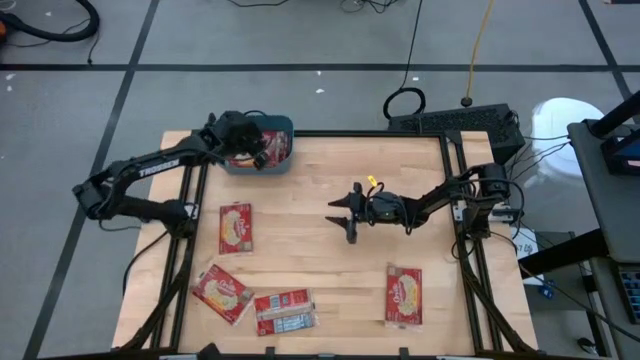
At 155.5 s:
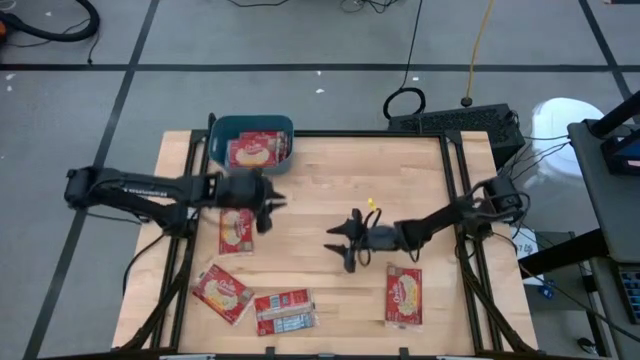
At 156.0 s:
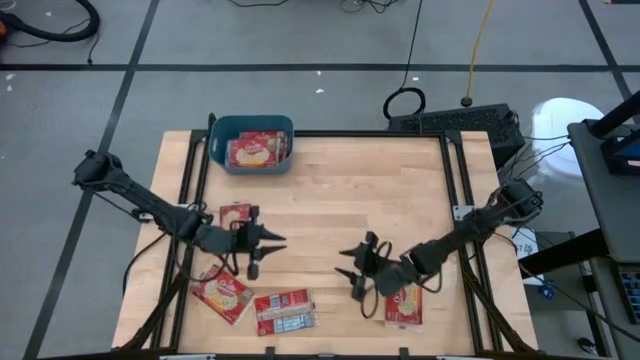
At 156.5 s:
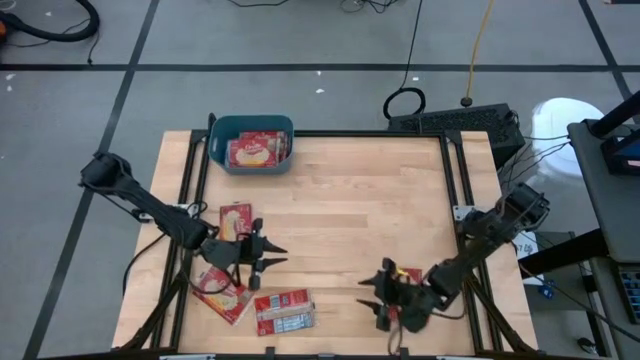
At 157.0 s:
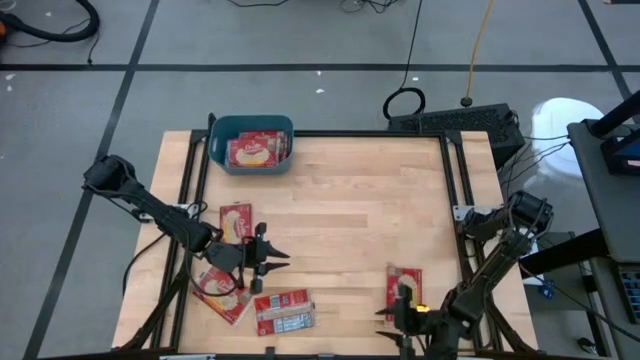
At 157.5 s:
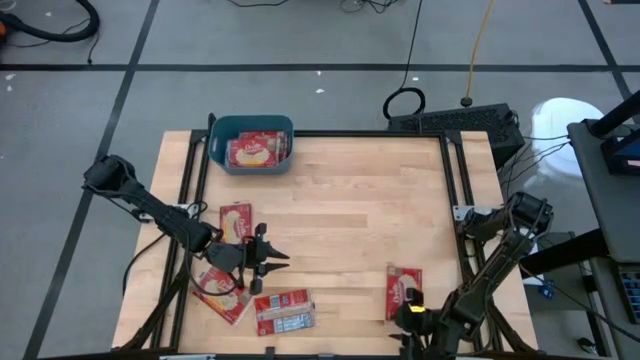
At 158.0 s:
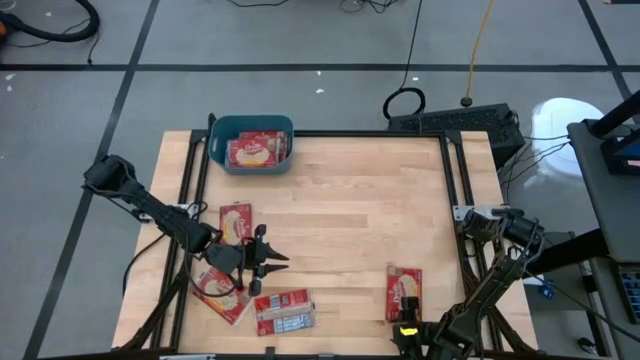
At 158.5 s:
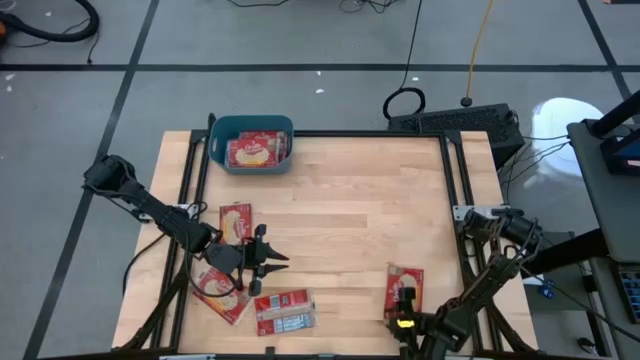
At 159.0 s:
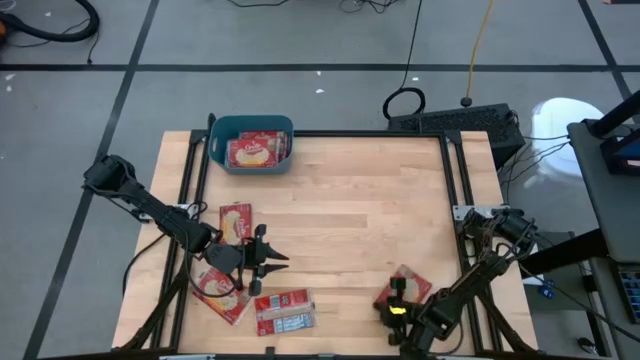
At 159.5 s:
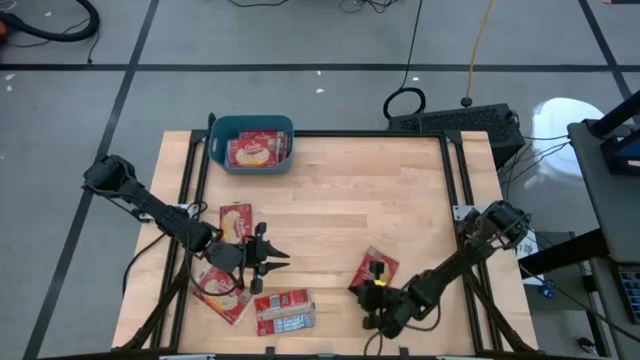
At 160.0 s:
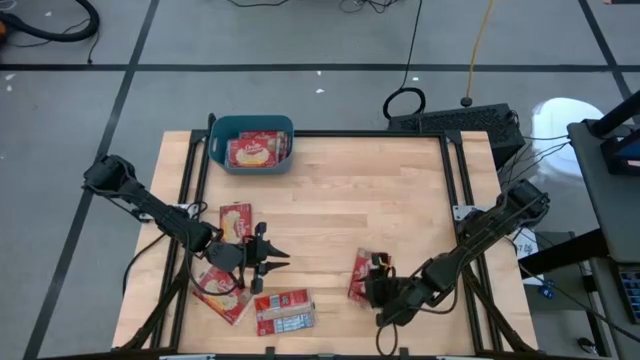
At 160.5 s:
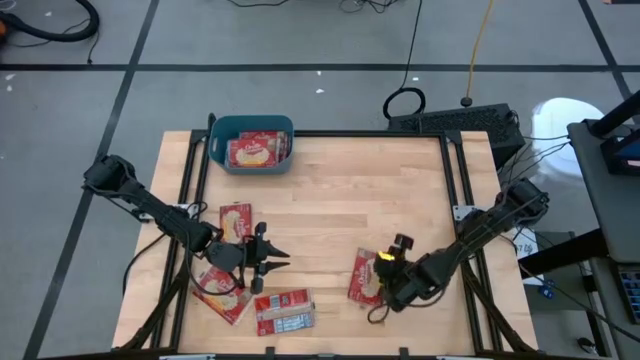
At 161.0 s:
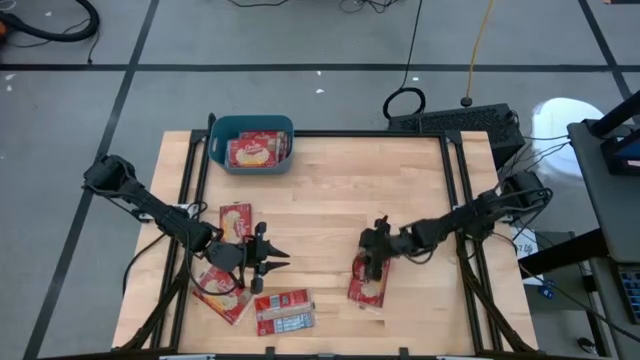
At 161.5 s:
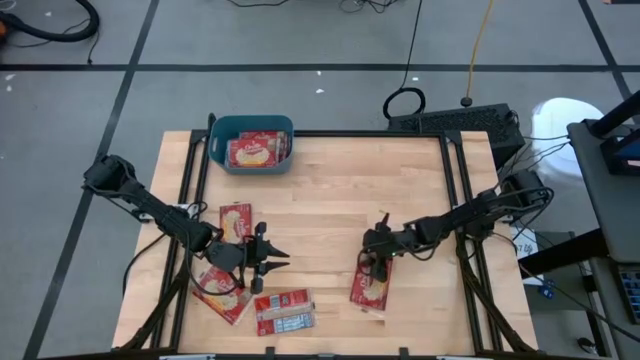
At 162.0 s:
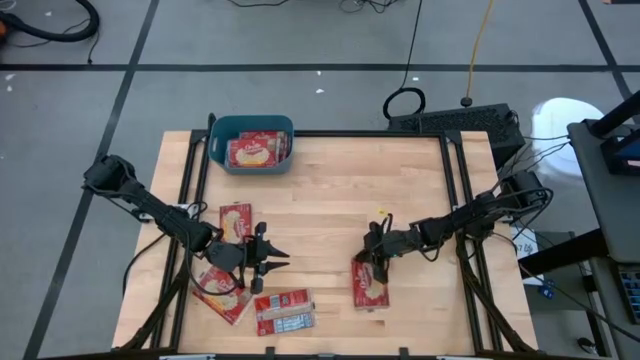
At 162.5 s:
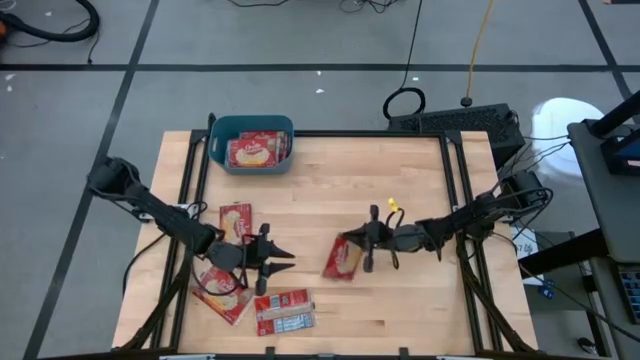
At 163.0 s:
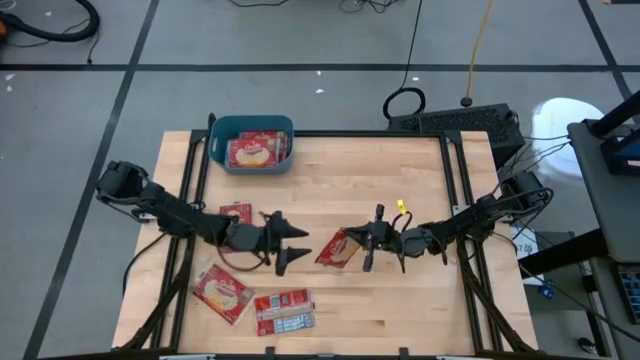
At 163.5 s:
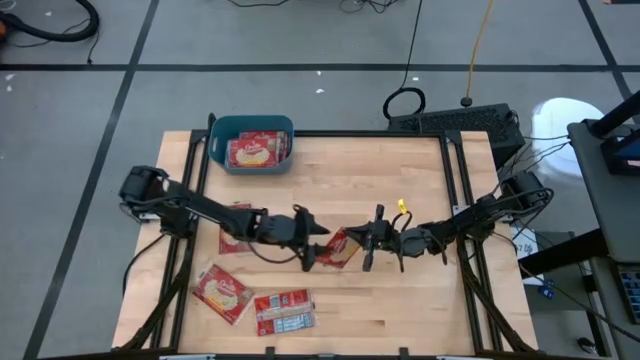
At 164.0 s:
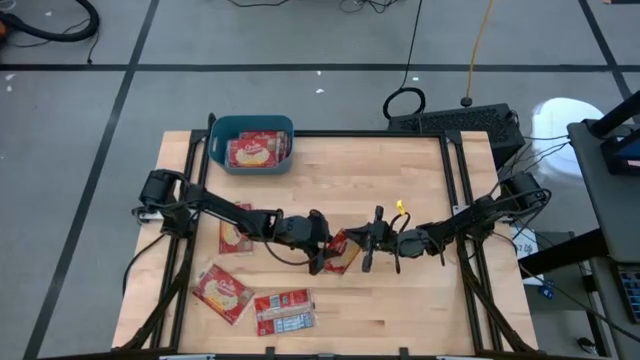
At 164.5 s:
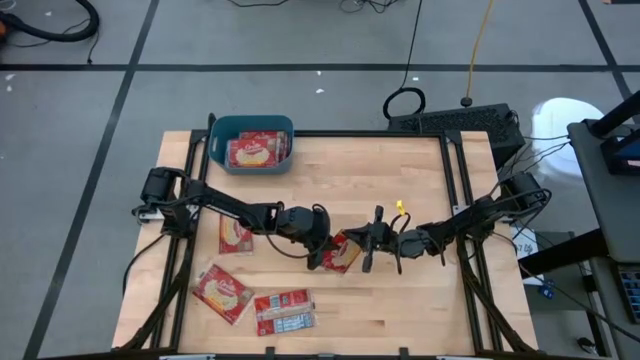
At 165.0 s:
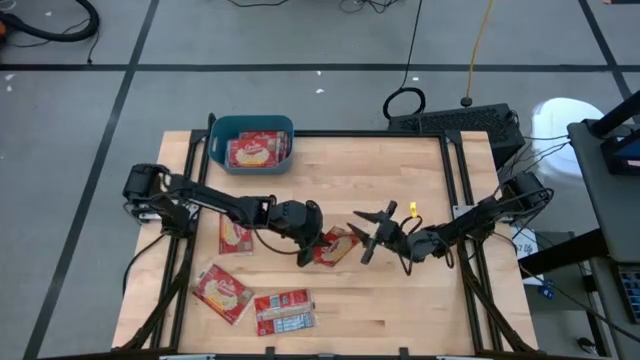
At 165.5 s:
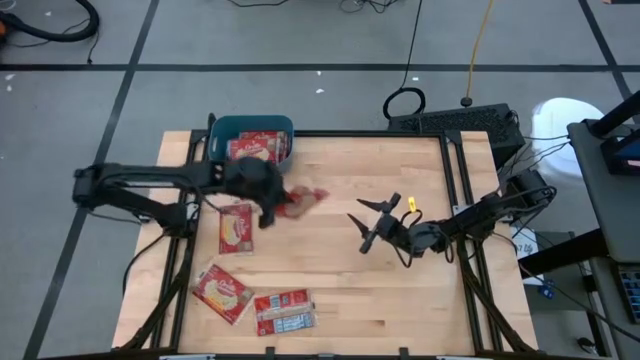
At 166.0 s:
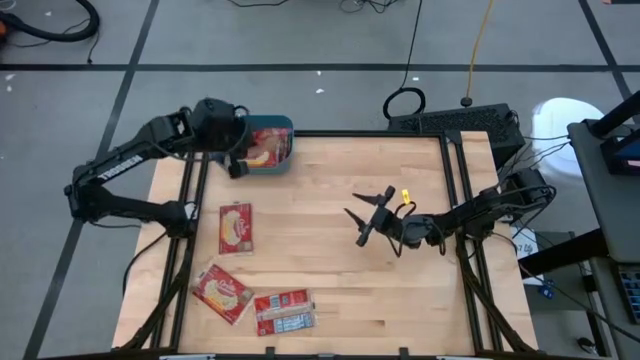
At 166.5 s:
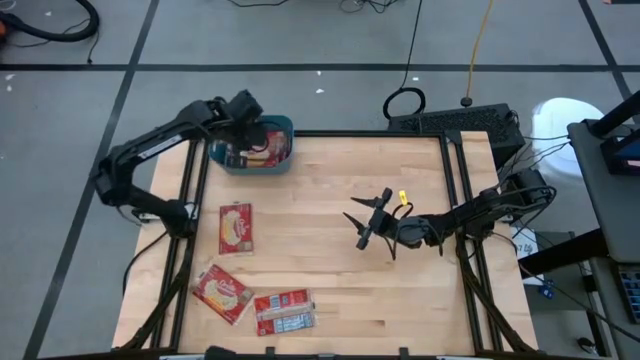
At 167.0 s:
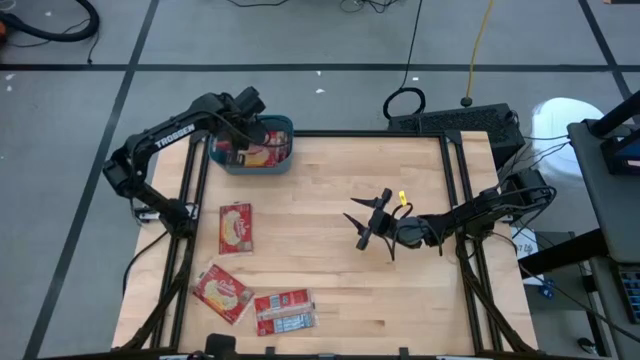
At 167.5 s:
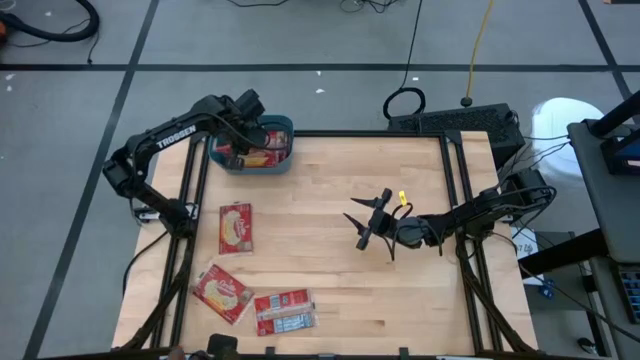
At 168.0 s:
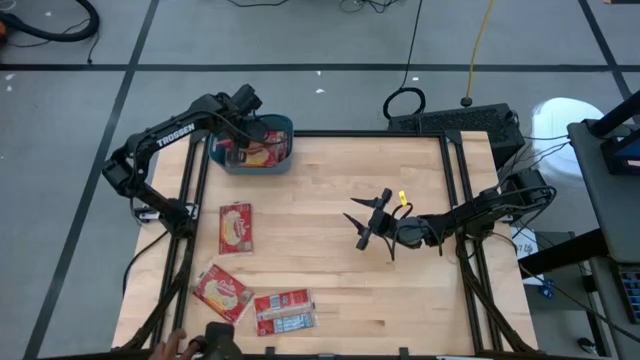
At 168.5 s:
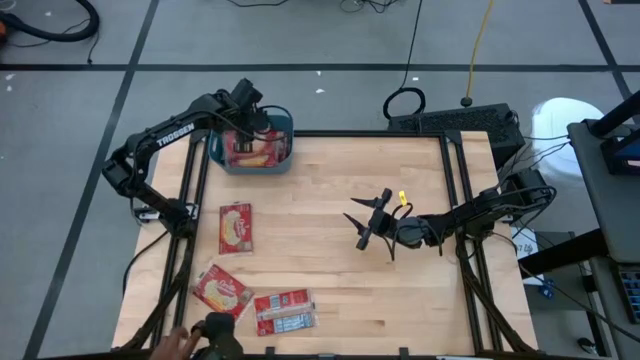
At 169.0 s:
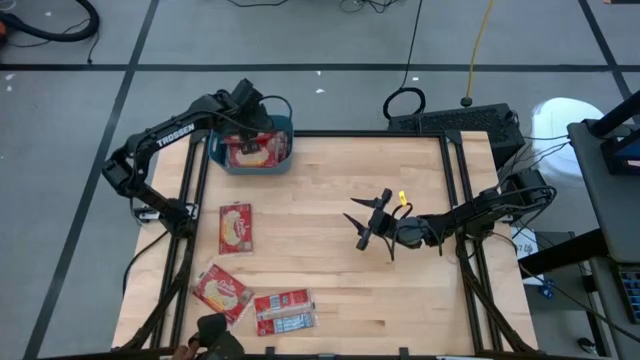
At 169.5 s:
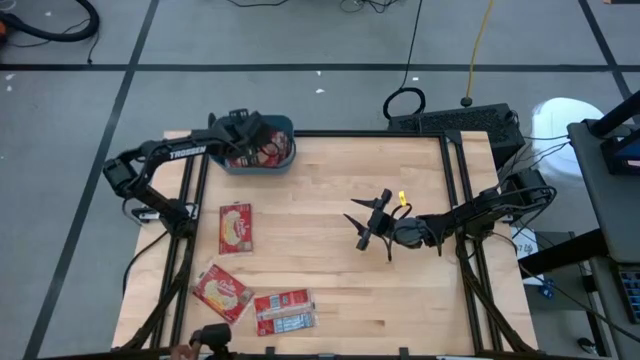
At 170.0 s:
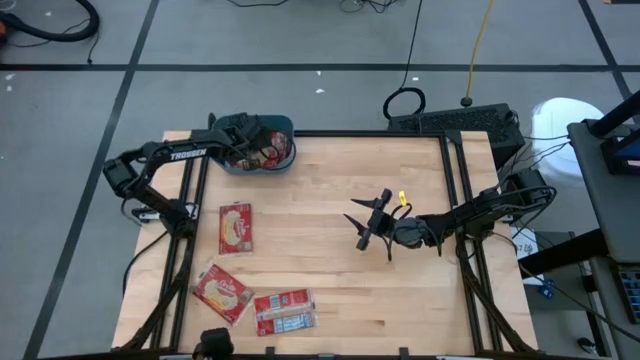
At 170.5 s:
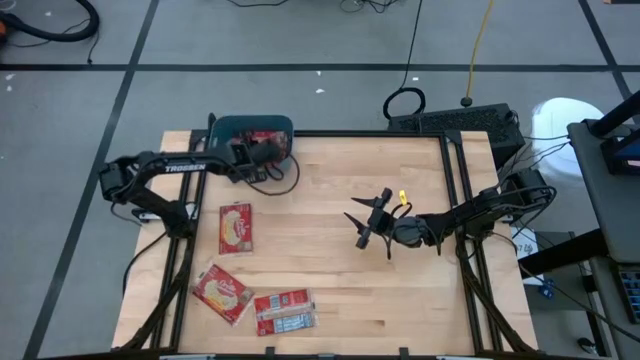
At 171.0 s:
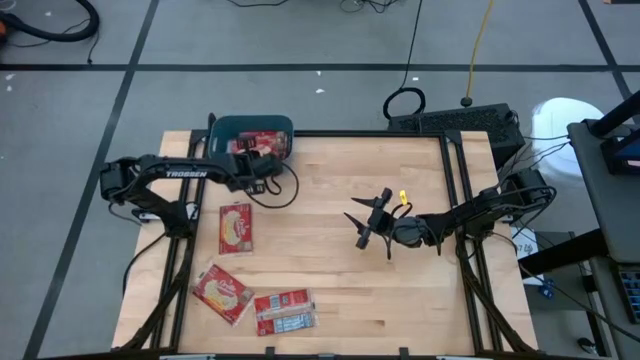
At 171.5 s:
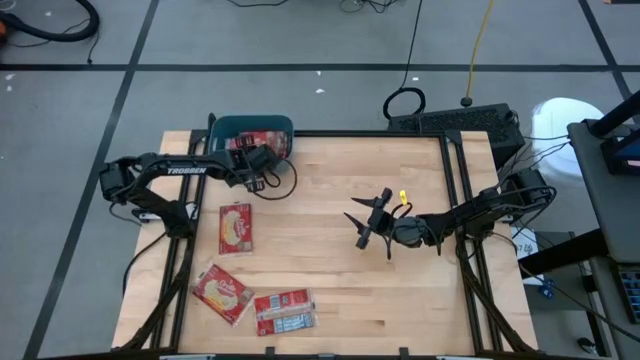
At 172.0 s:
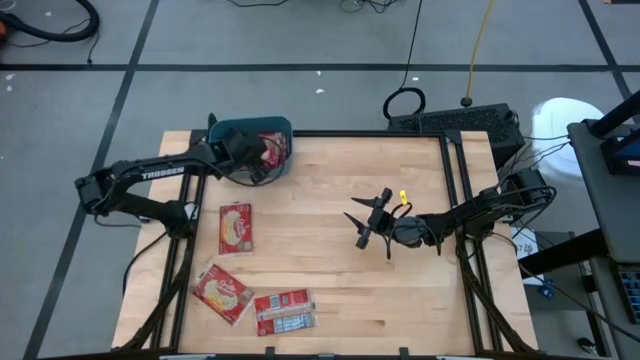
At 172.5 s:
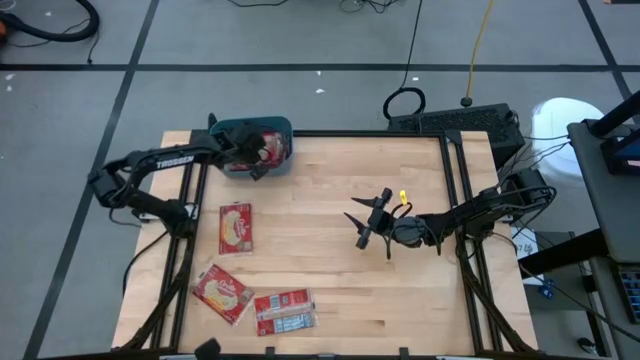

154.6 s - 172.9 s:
Task: Sort popcorn bags into baskets
Put the red popcorn bag into the blue bin

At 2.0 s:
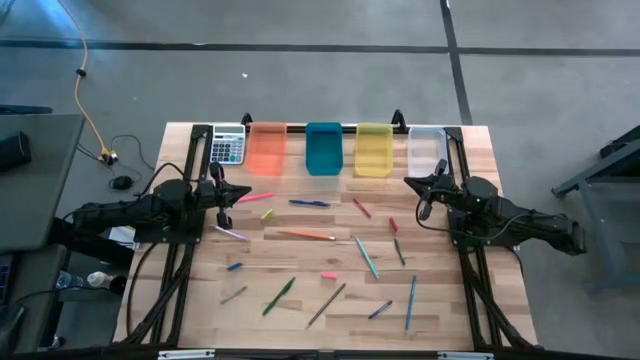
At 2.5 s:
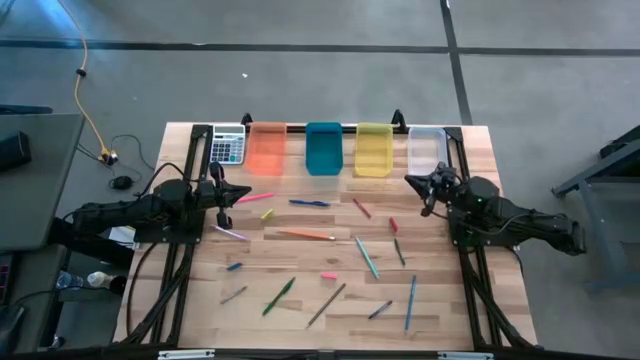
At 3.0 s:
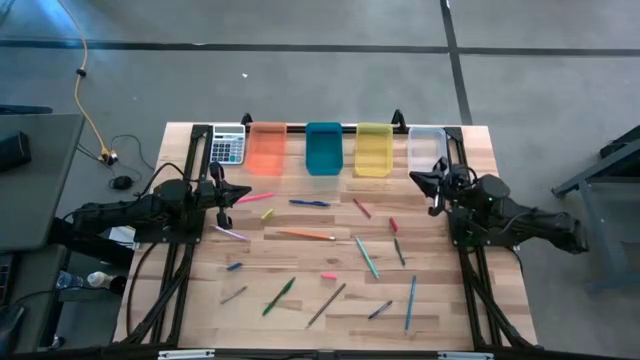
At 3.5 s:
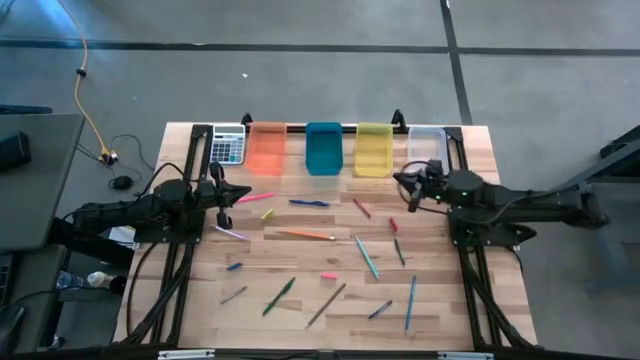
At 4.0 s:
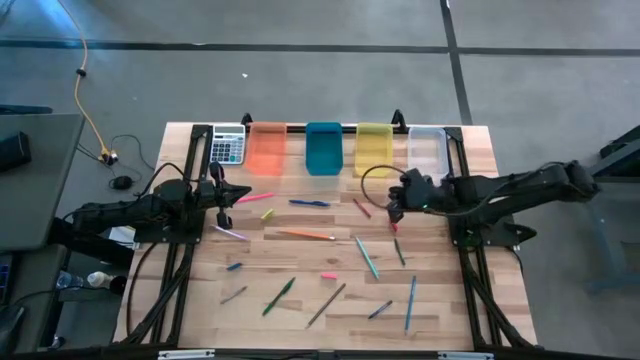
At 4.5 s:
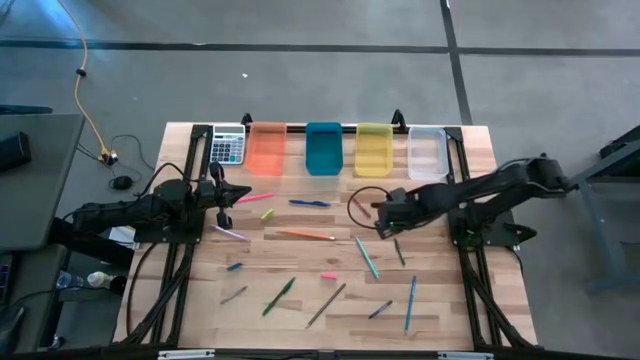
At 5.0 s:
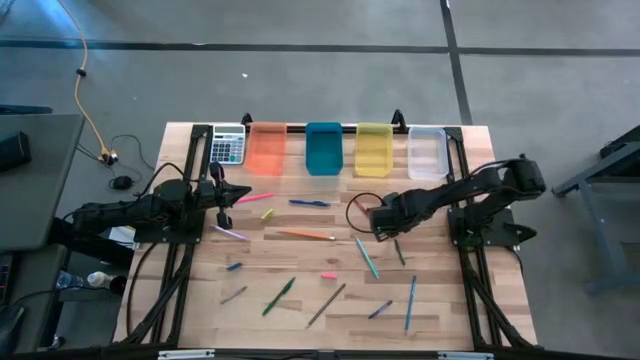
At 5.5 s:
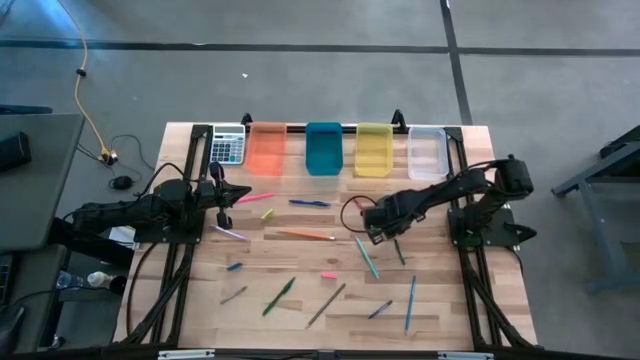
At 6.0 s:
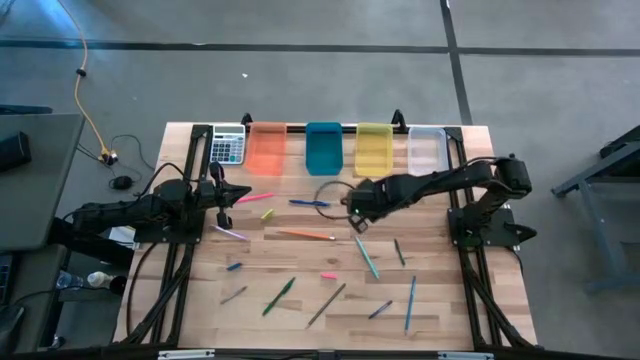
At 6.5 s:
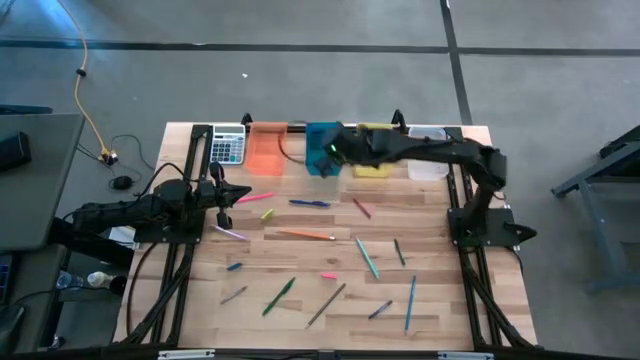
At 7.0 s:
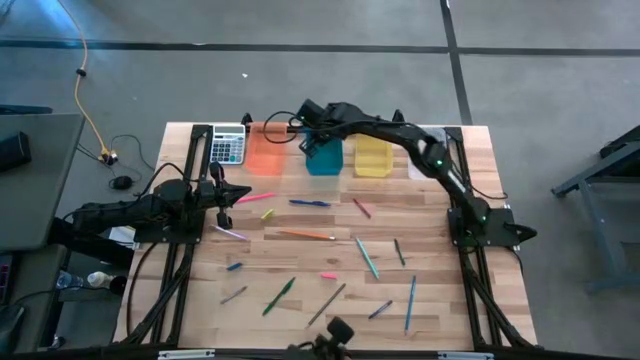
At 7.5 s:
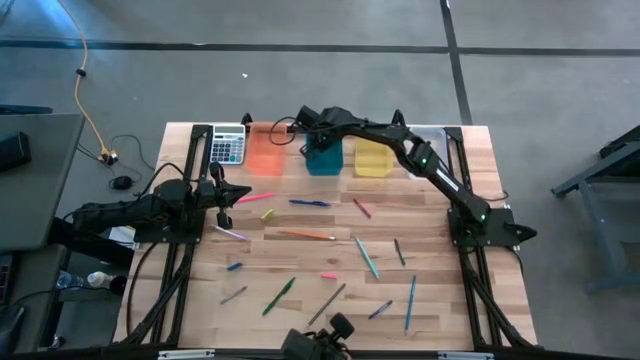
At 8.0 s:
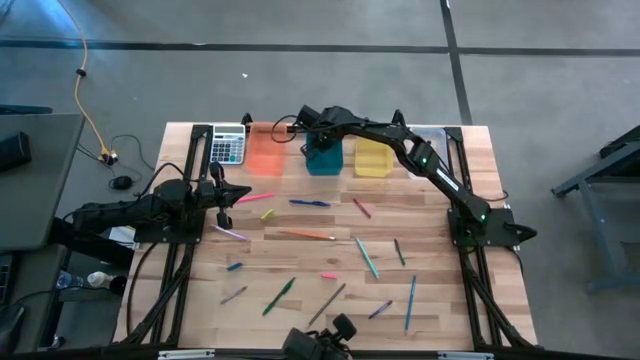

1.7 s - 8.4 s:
Task: Sort crayons/erasers/pens/pencils in bins
Put the red eraser into the blue bin
